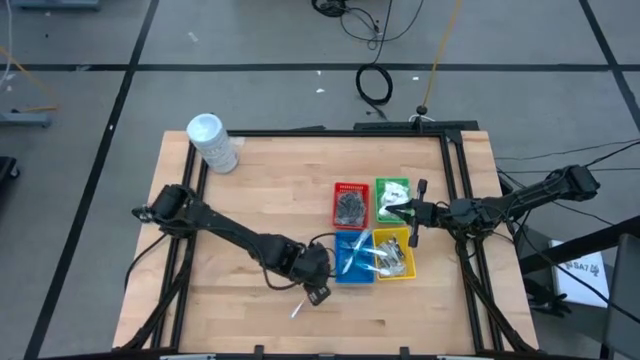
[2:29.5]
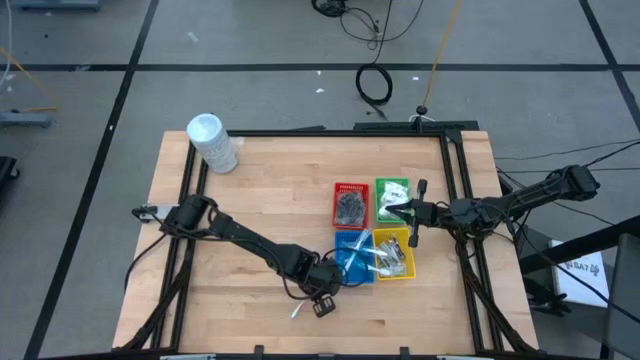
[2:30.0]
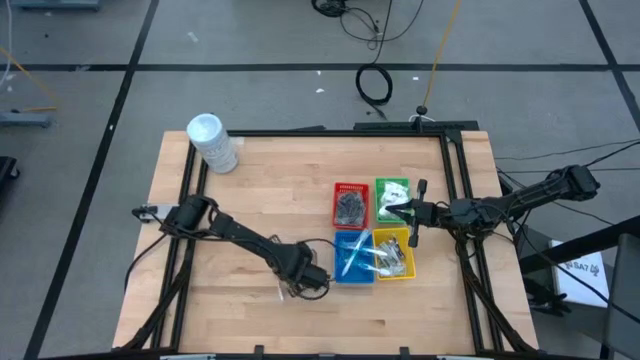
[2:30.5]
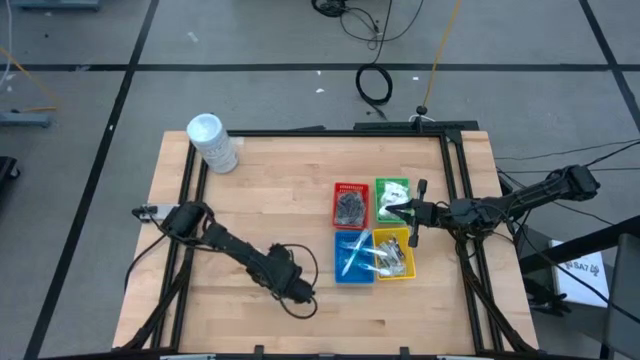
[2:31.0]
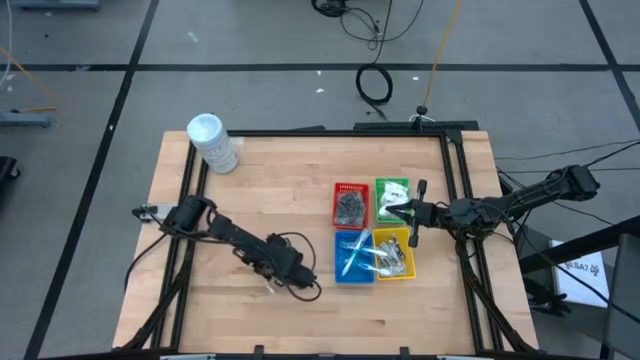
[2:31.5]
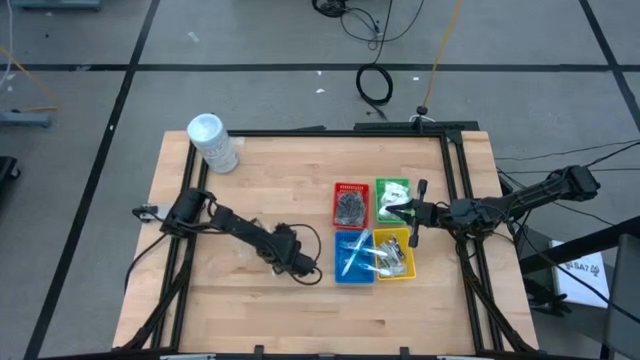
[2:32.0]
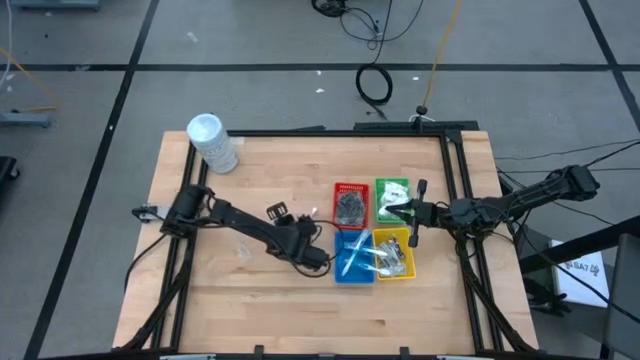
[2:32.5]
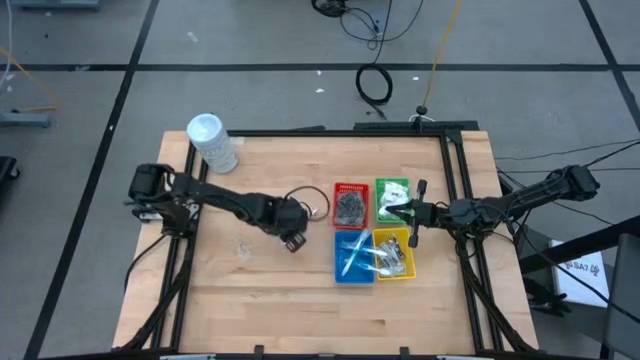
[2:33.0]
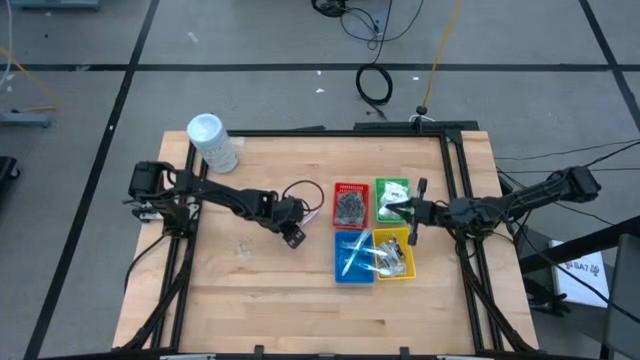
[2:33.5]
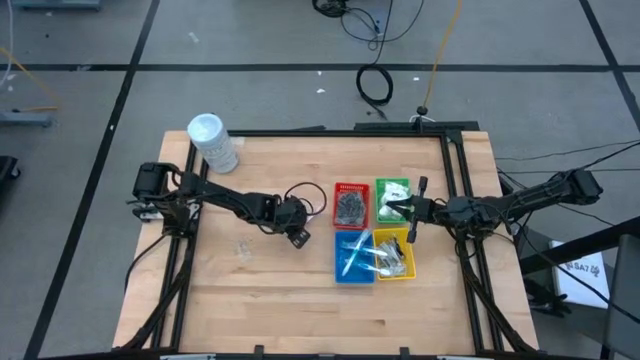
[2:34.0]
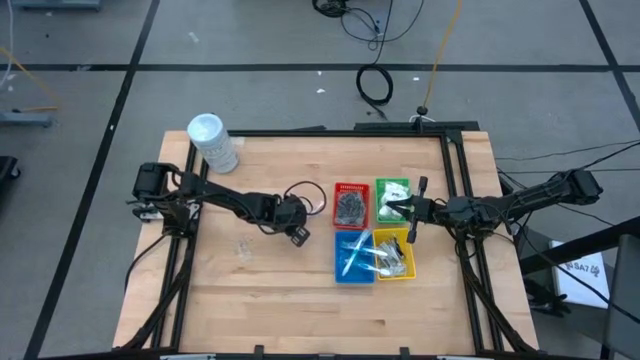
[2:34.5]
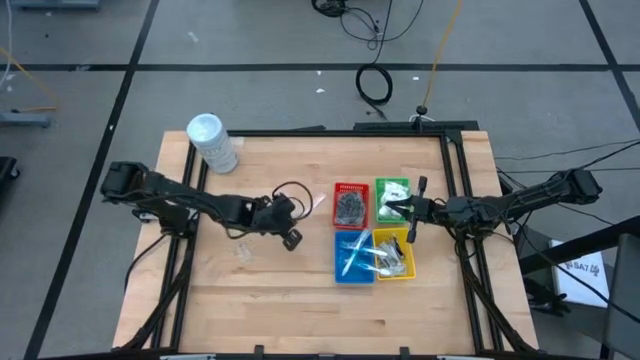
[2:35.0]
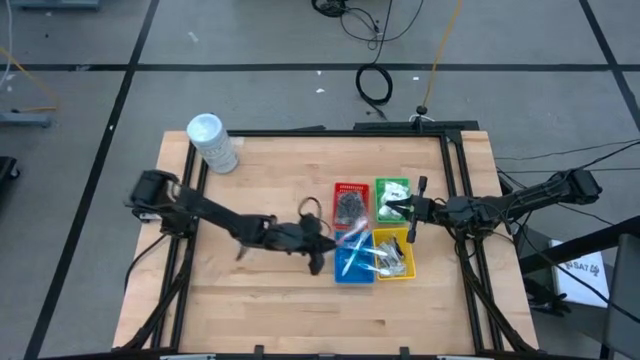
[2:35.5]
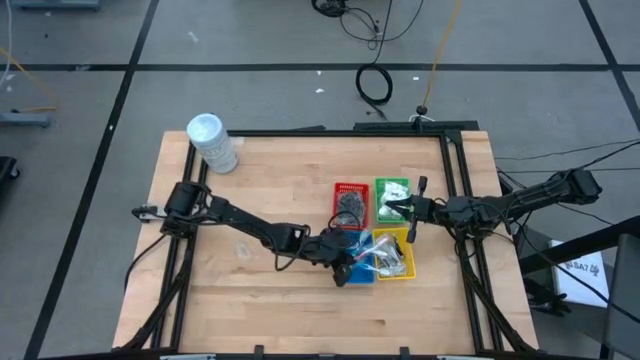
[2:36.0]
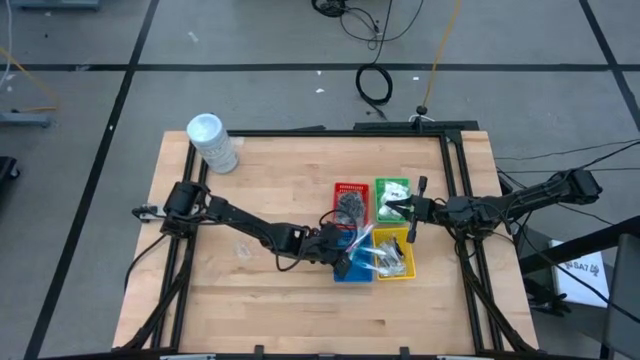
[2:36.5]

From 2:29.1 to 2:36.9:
Task: Pick & Place Travel size toiletries
Put the orange toothbrush into the blue bin

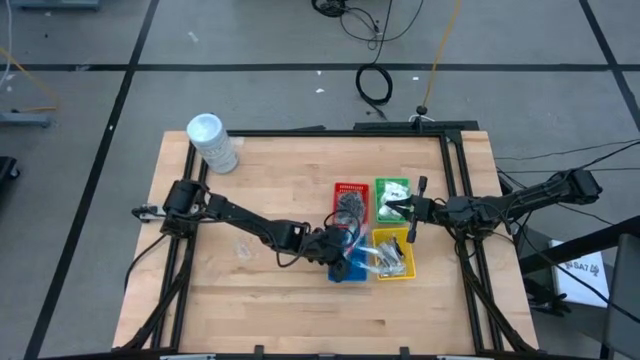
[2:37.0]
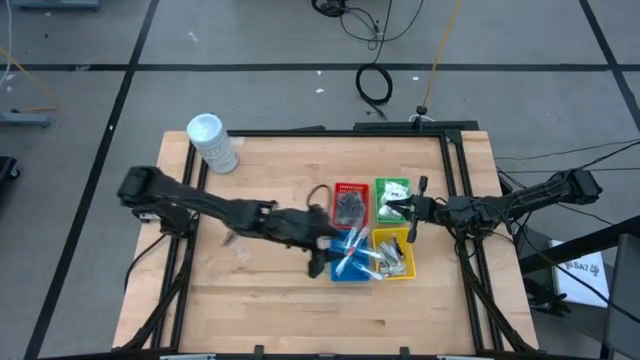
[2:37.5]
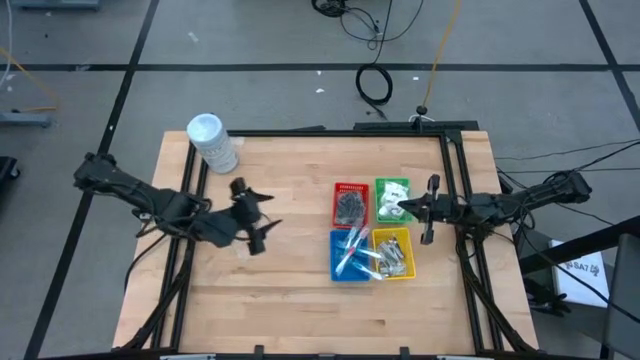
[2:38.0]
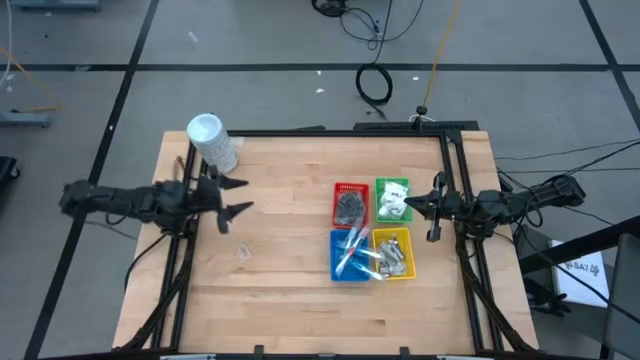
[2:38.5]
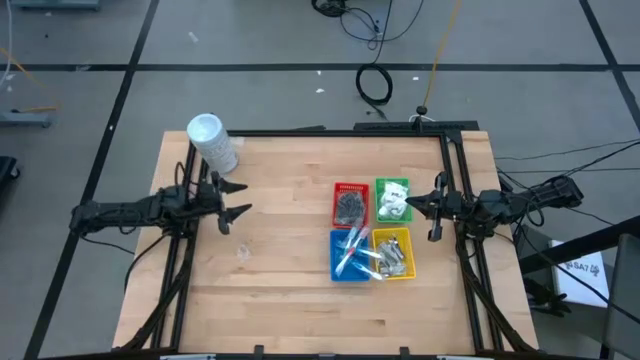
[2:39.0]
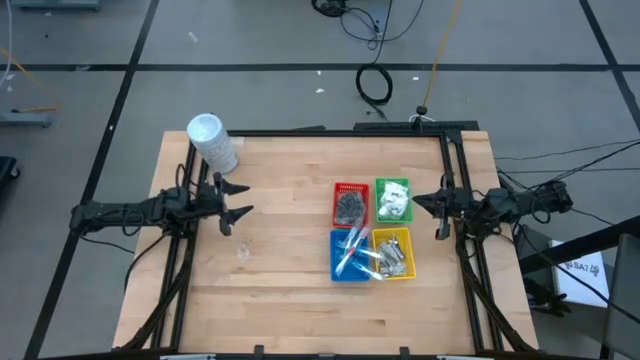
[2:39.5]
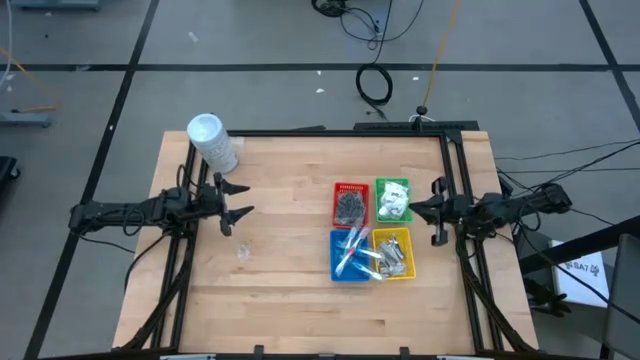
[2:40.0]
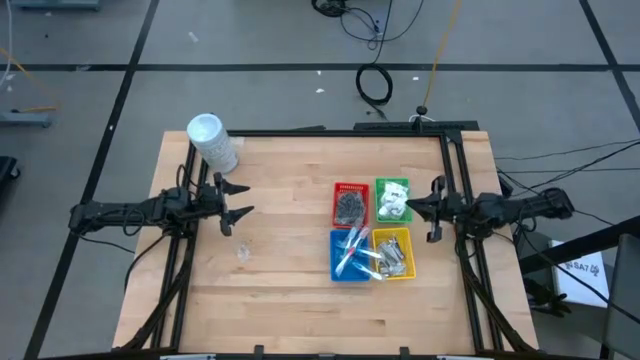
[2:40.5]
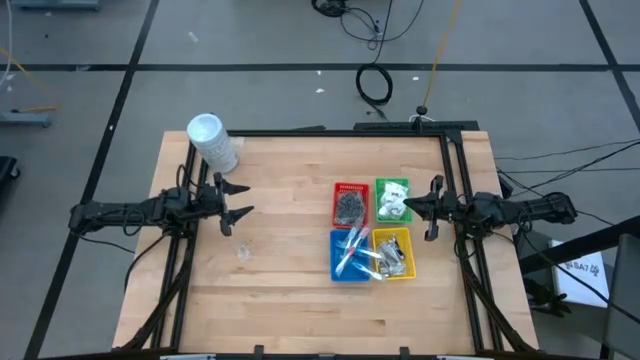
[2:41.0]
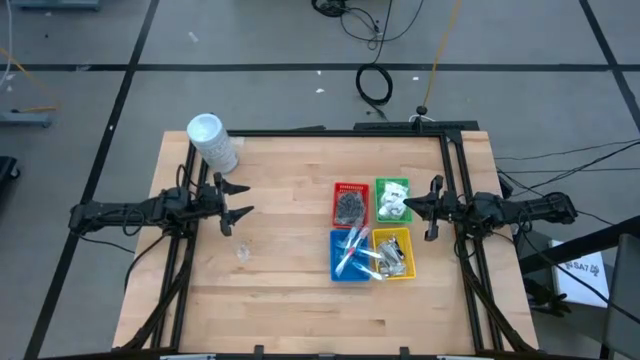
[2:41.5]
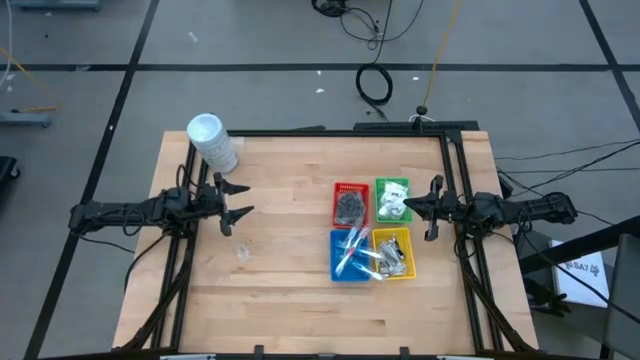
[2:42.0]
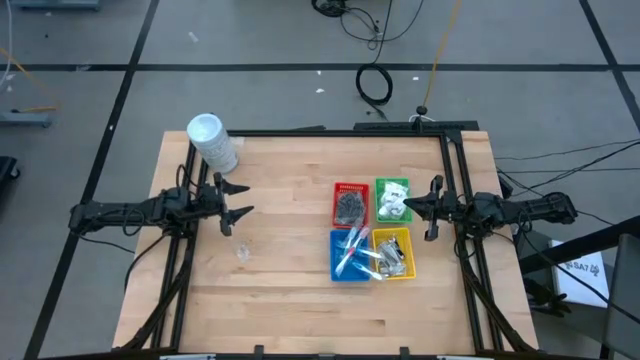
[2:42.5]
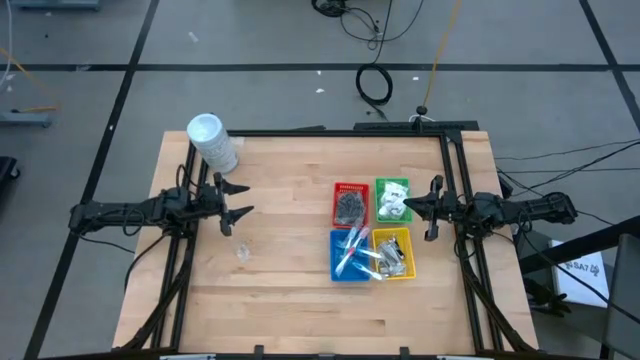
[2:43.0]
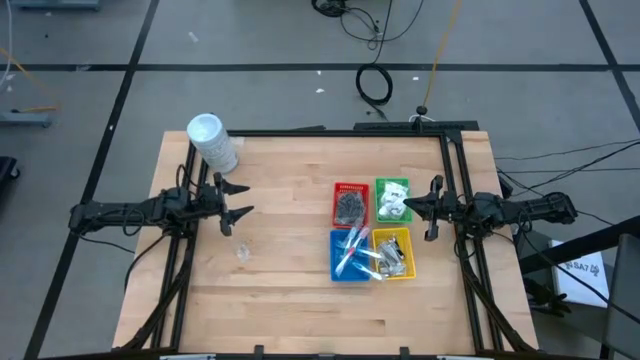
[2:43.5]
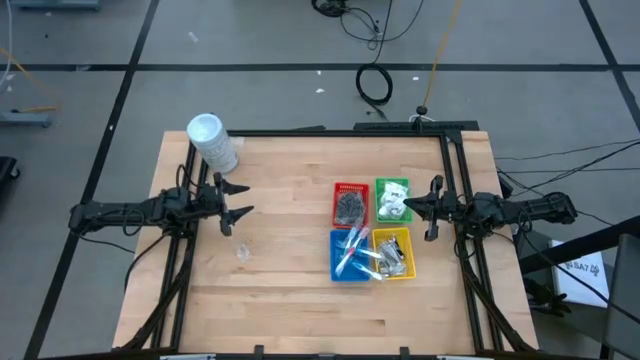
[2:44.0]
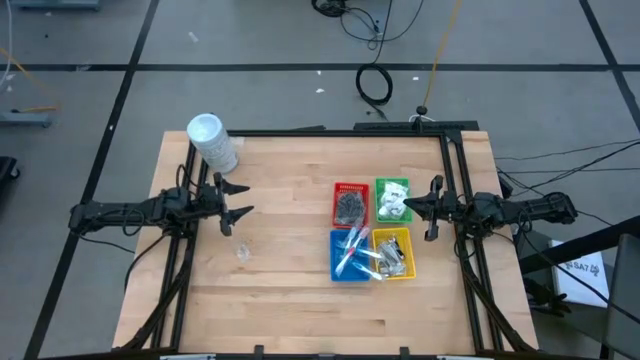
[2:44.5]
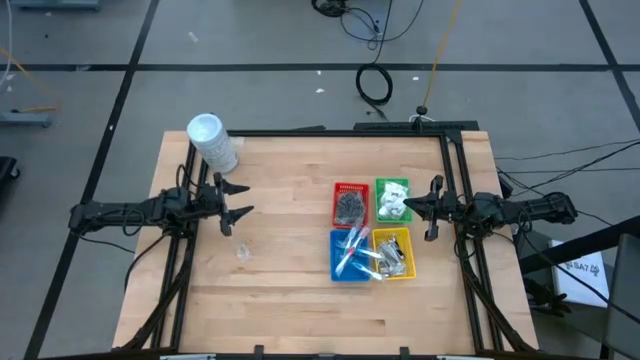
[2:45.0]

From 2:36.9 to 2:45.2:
Return to Home Position

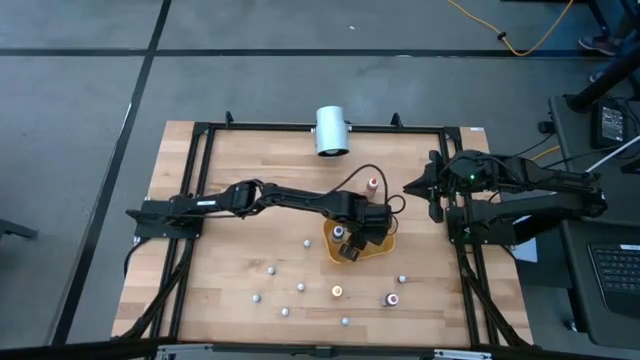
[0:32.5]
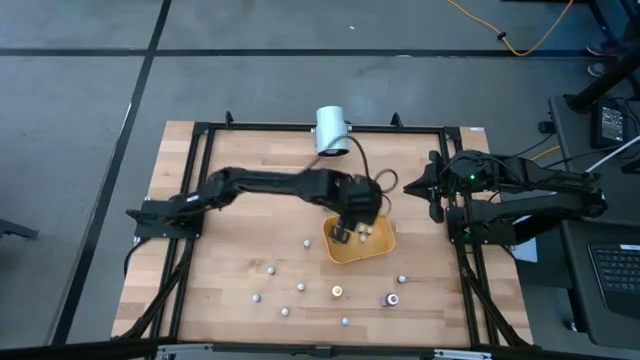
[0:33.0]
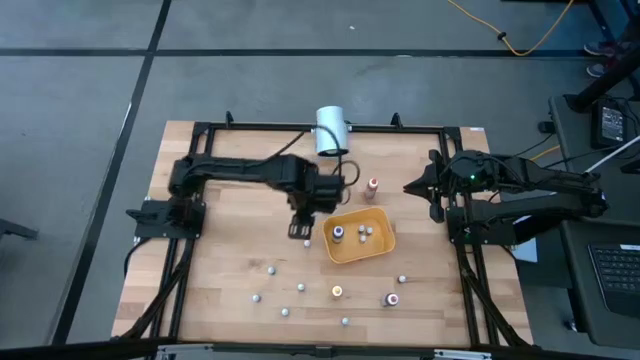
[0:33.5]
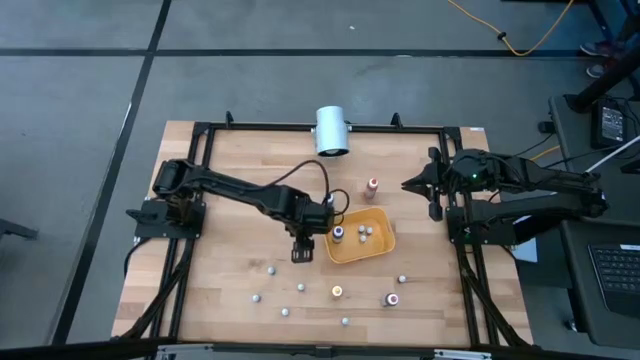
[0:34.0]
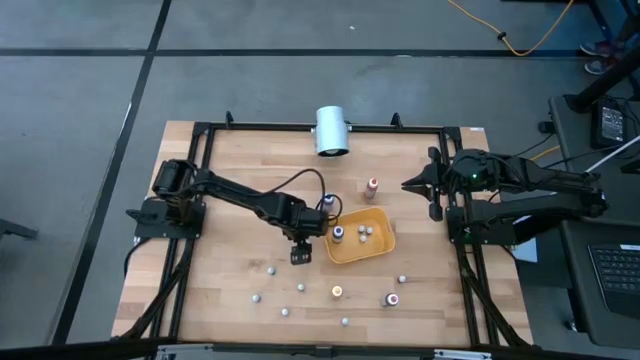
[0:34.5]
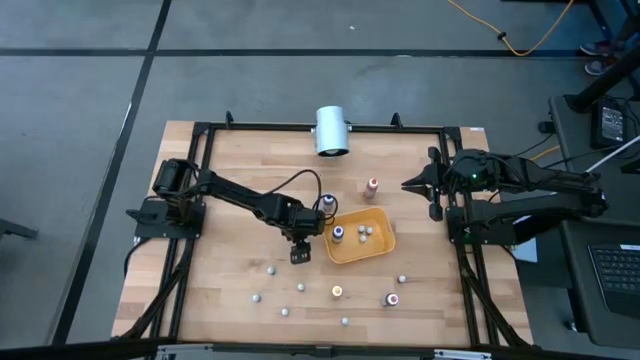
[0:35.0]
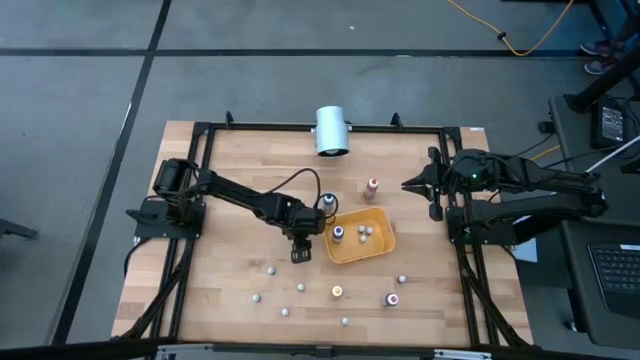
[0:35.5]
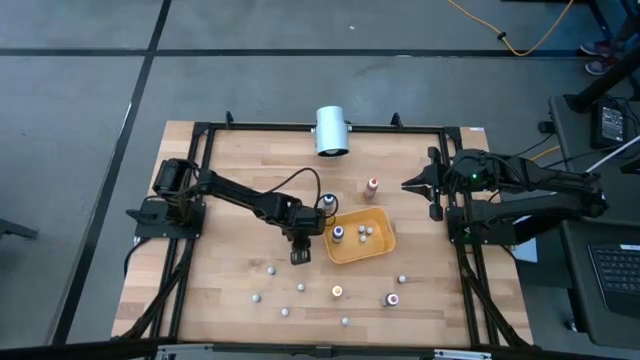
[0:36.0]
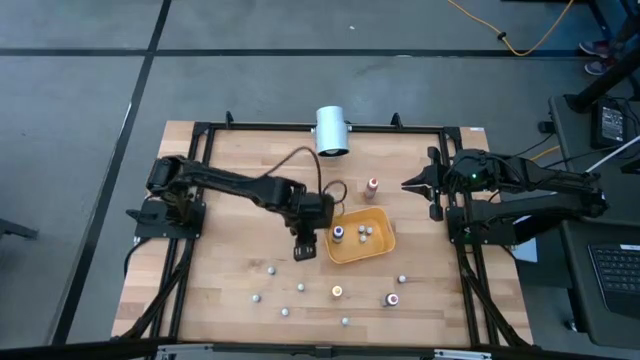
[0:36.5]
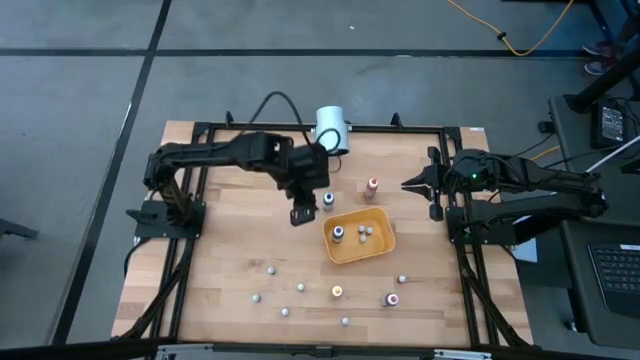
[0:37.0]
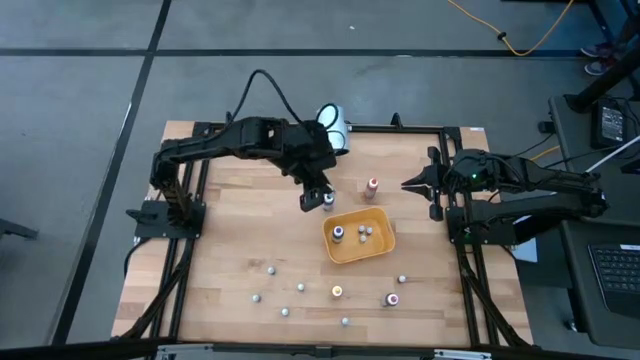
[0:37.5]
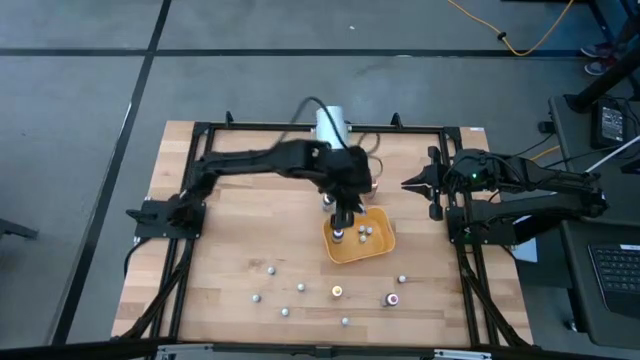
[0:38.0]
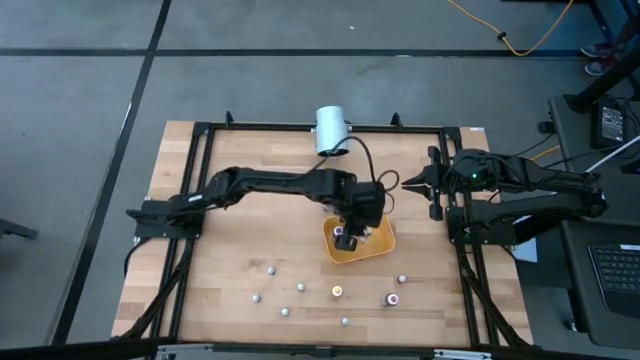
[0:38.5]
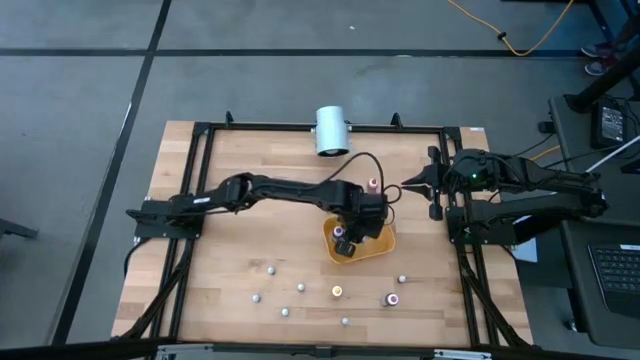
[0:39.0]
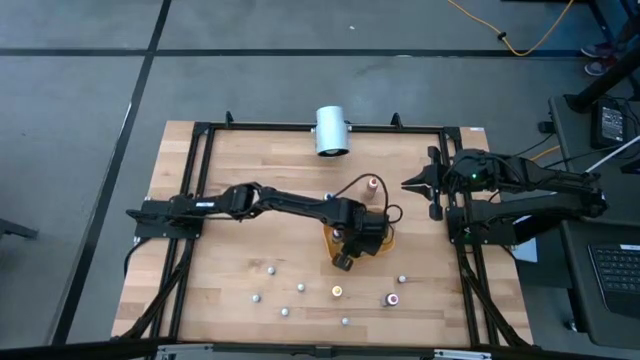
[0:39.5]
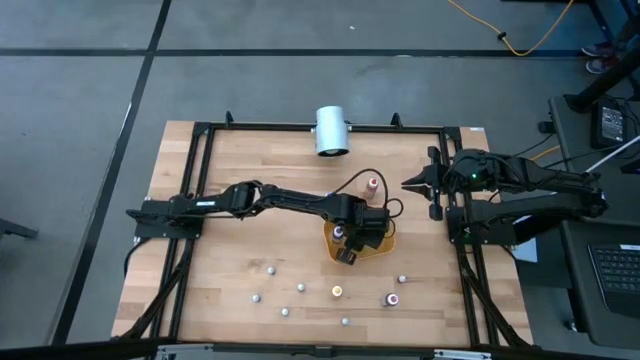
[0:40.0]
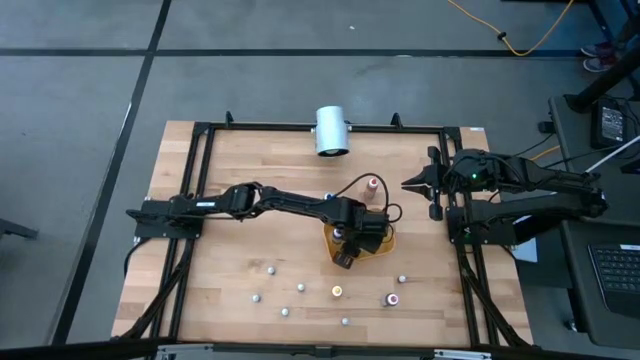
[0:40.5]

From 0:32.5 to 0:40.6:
Task: Pick & Place food coloring
Put the small green food coloring bottle into the yellow bin
